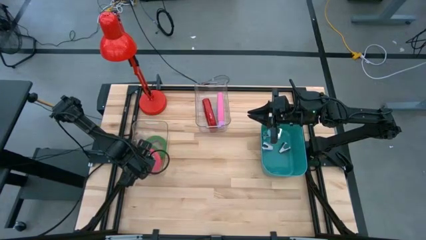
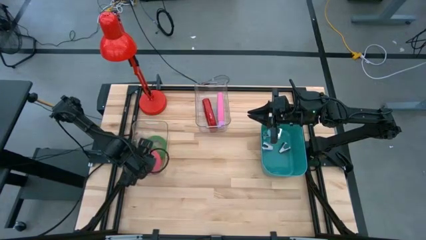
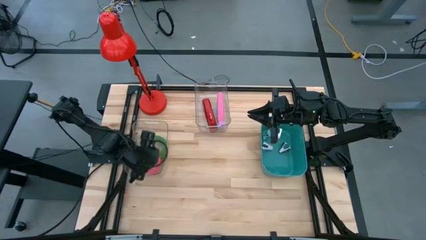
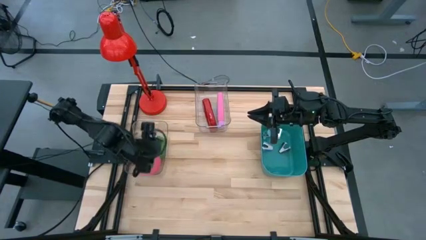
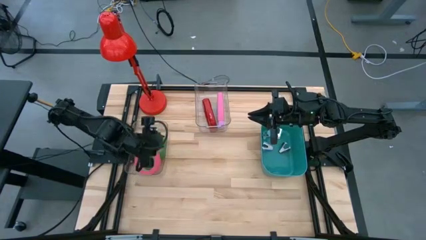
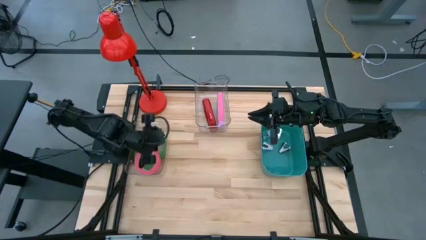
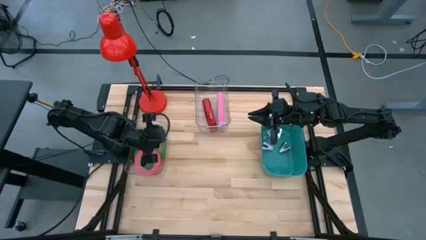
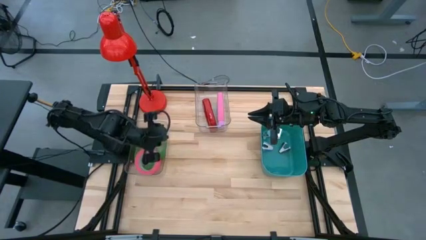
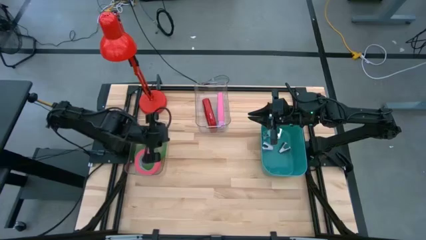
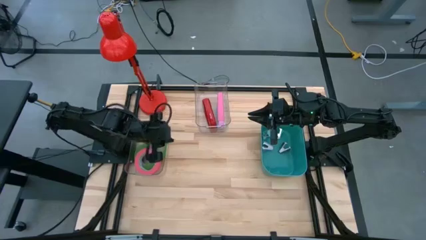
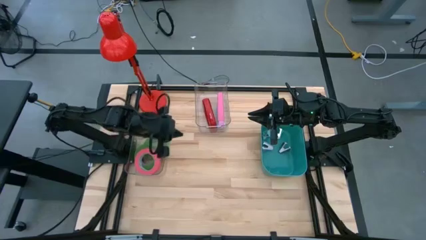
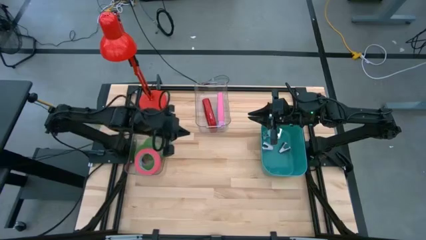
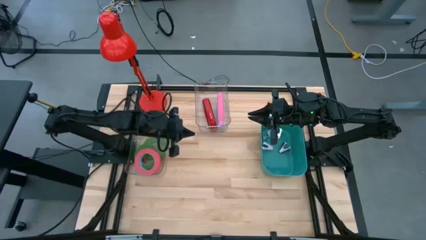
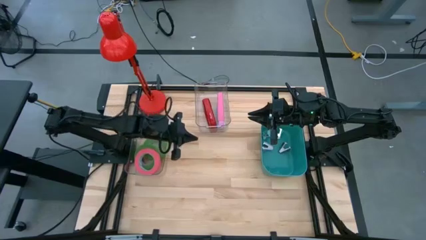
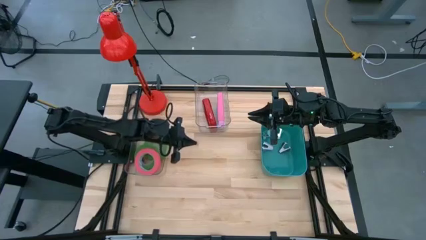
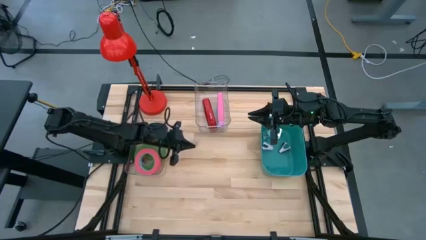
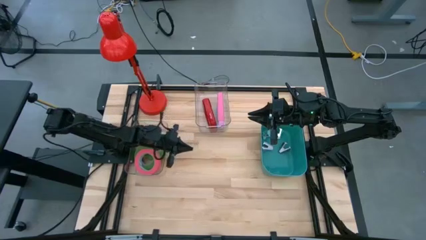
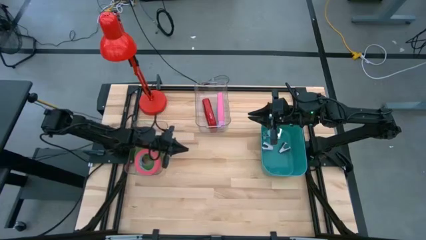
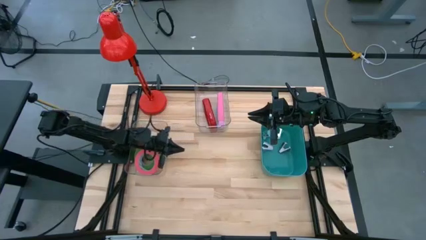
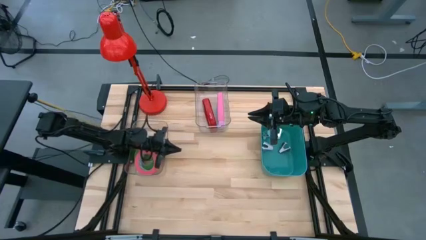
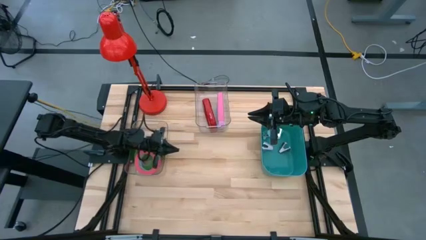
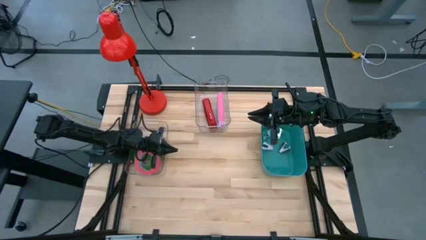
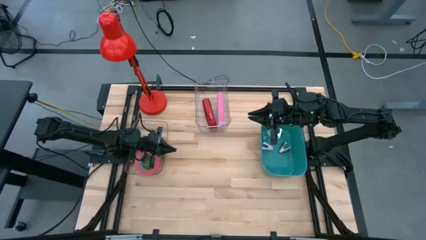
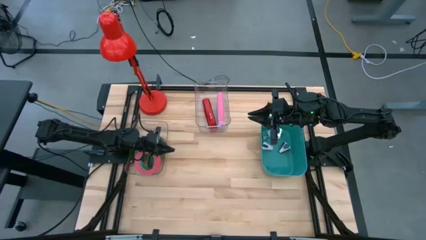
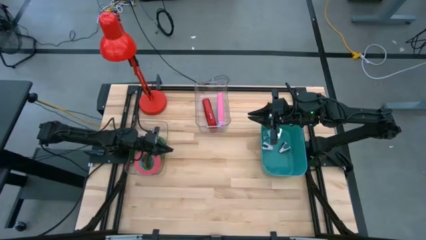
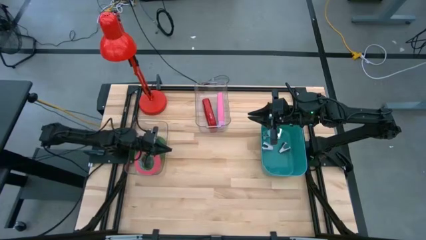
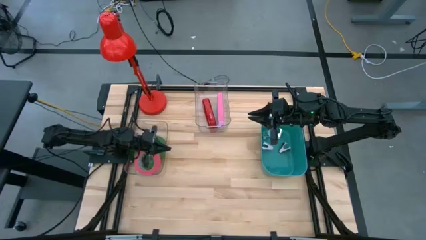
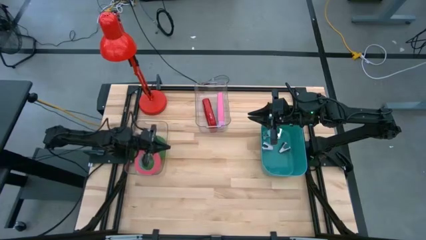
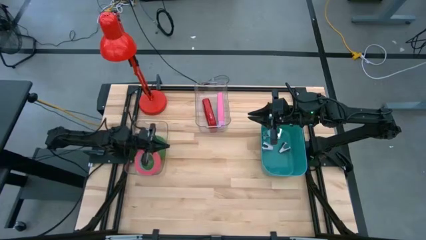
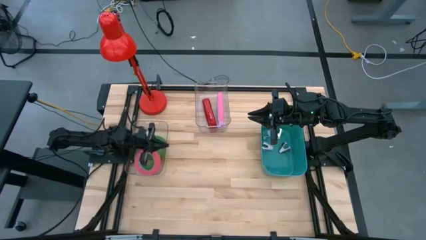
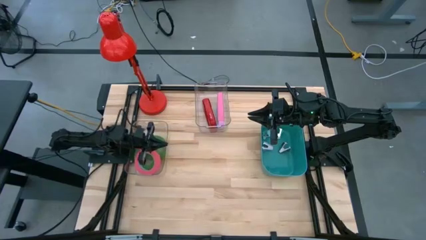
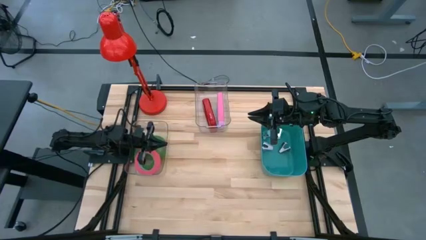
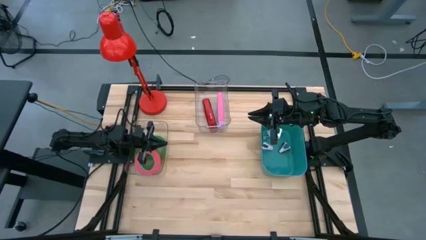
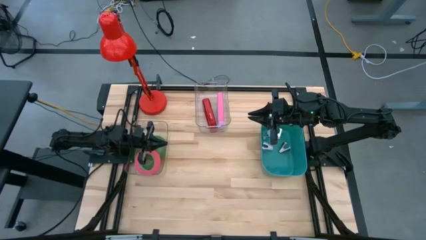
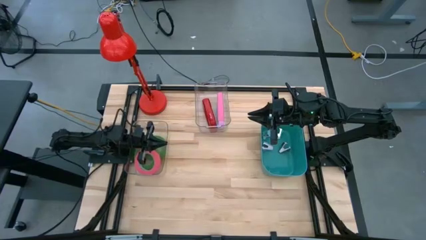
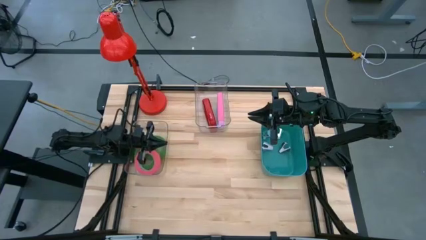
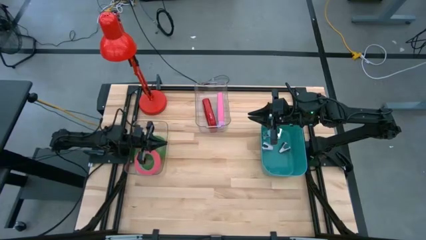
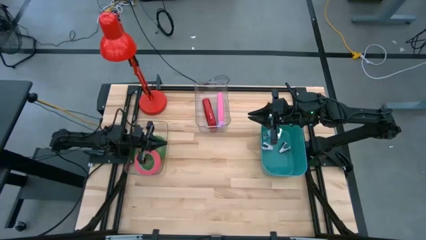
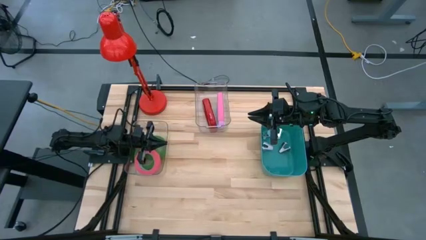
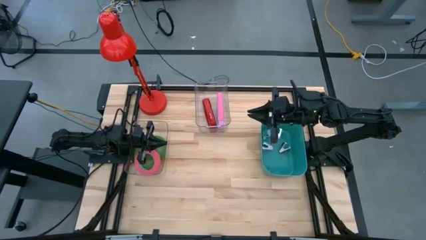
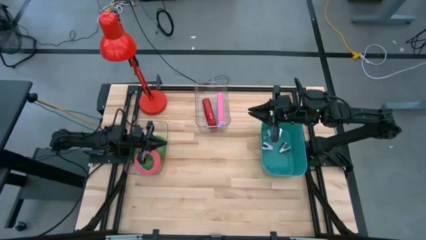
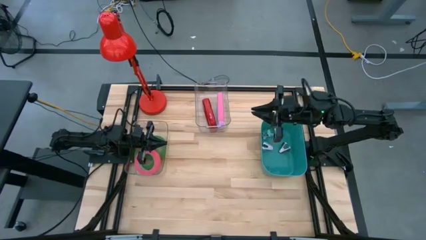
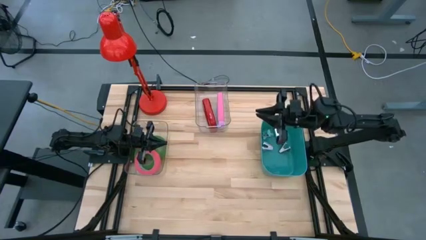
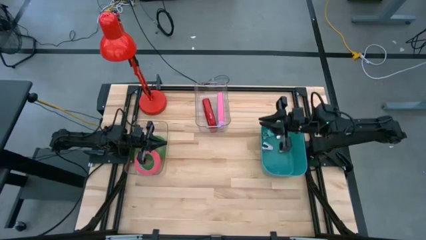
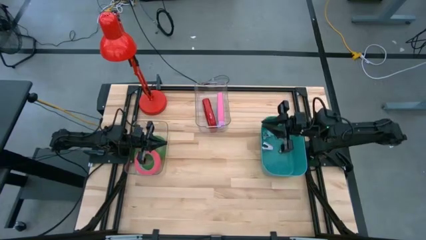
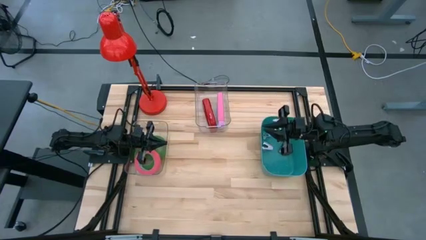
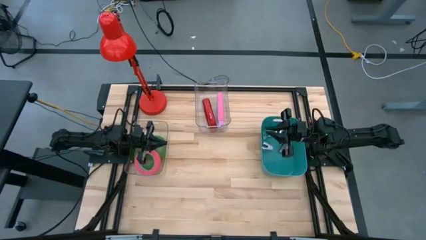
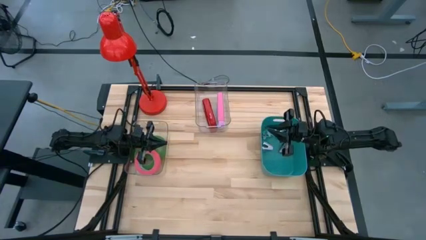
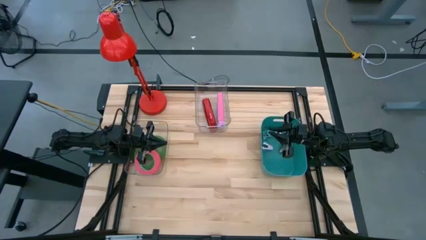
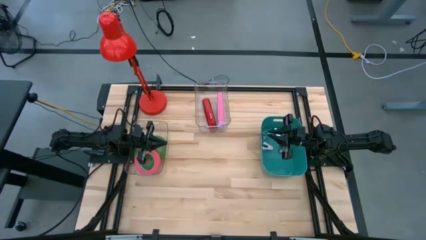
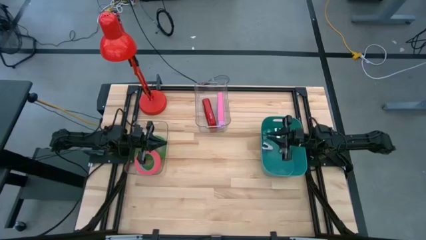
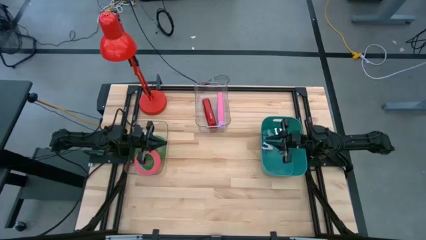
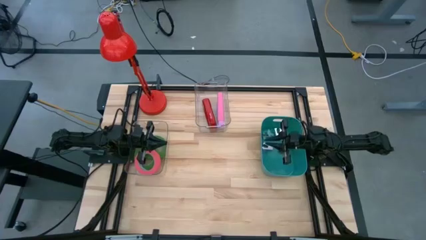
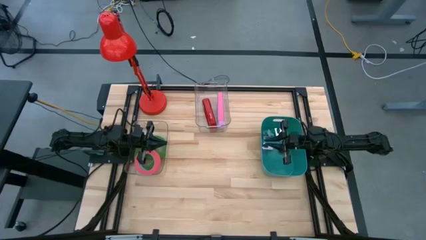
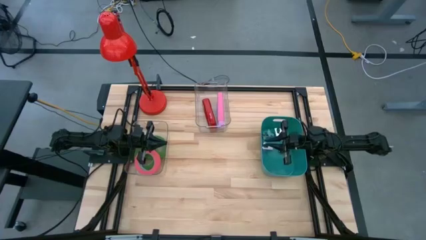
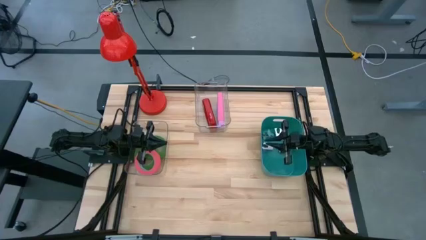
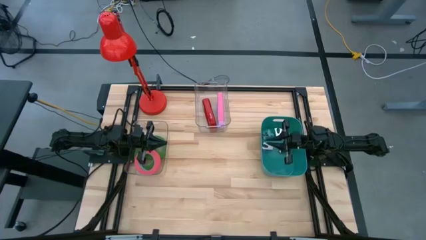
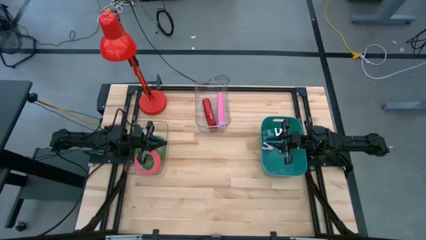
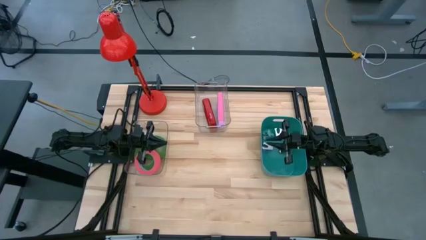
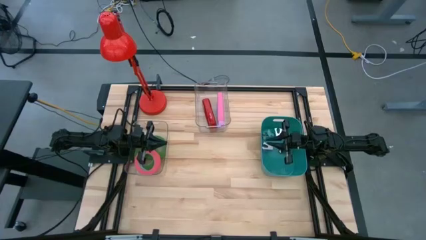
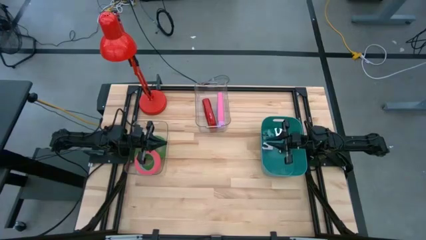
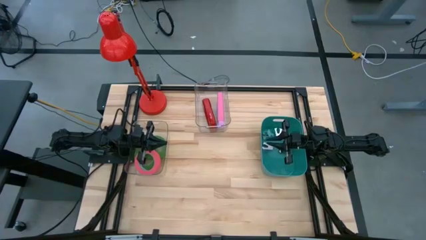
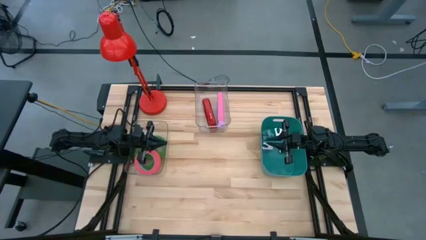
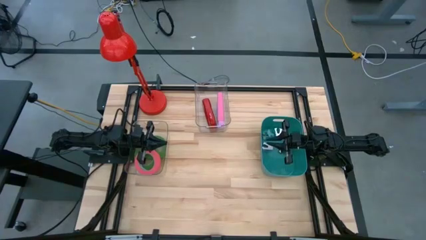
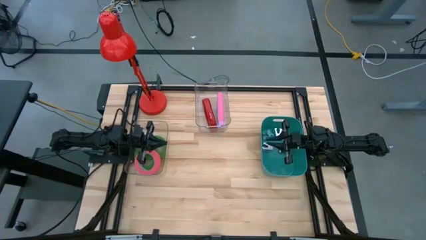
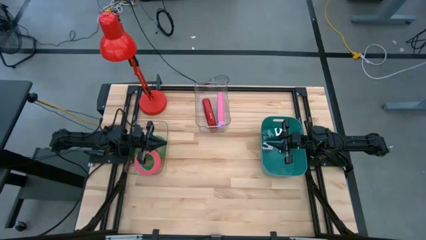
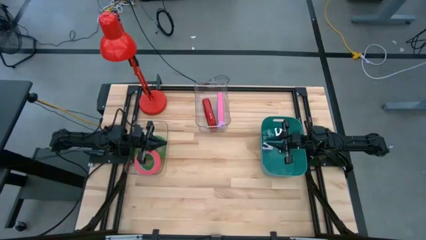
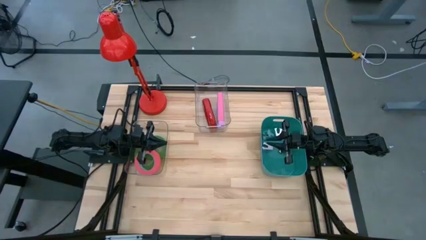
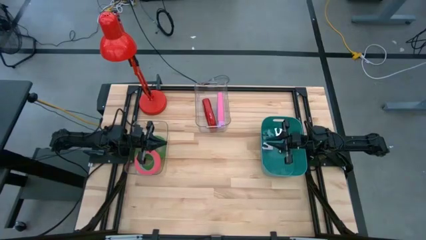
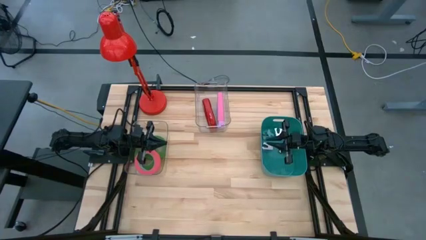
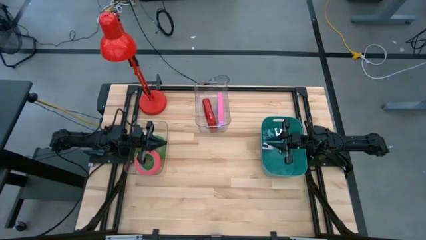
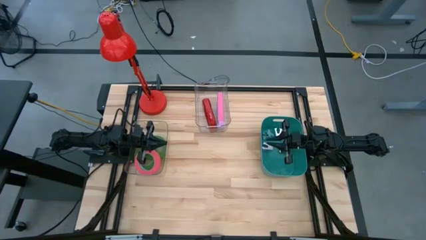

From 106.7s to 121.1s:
Task: Pick and place Stapler, Stapler remover, tape
Return to Home Position

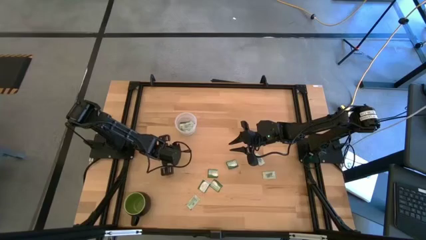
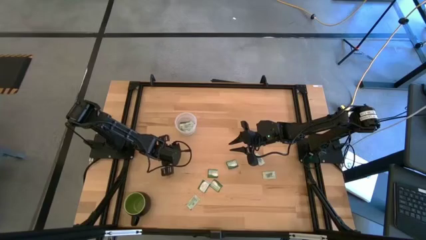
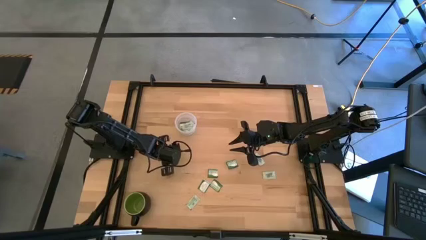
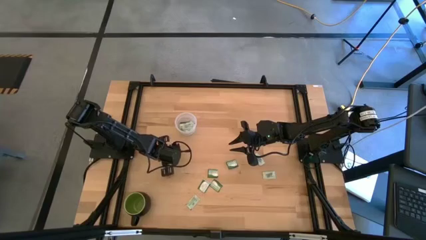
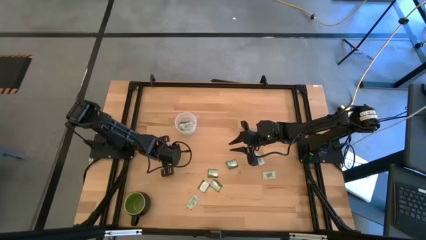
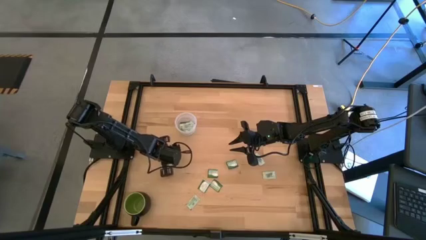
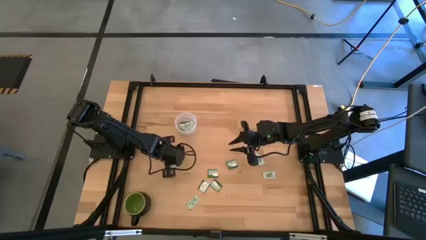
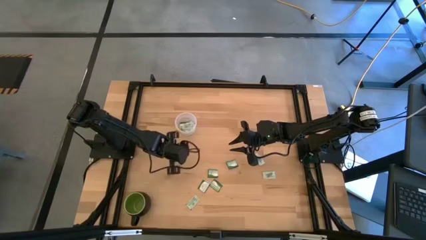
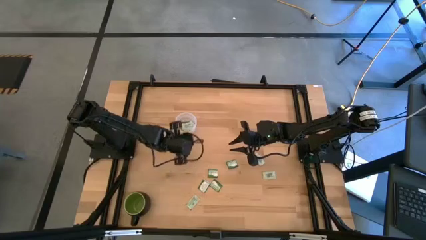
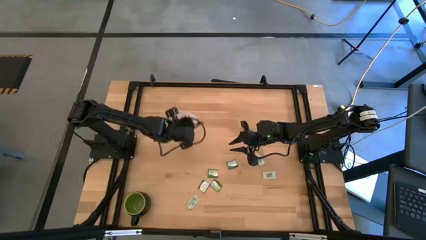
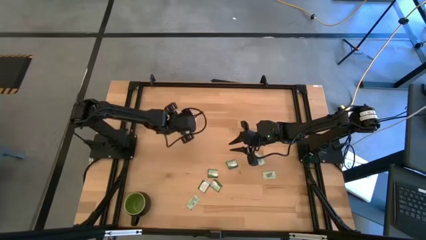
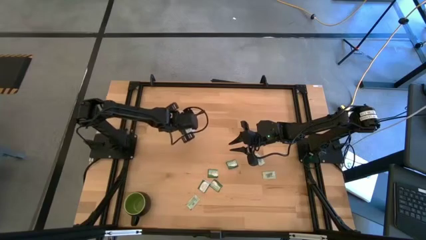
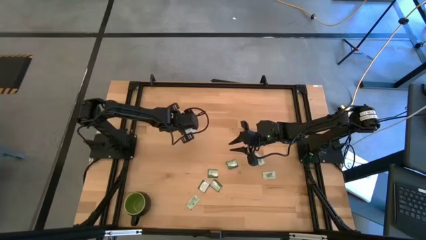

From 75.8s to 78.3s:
Task: Pick and place Stevia / Truvia into bins
Put the light green stevia packet into the transparent container

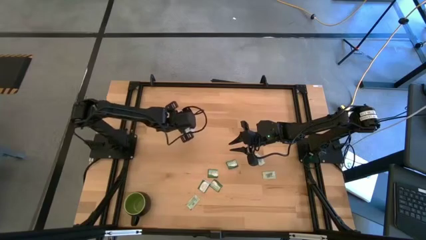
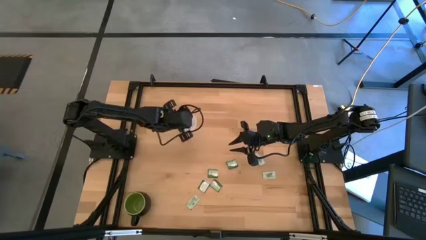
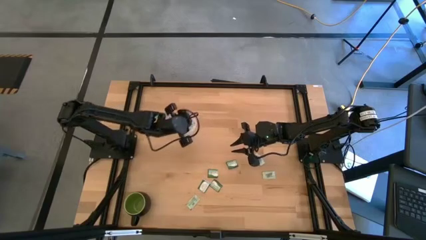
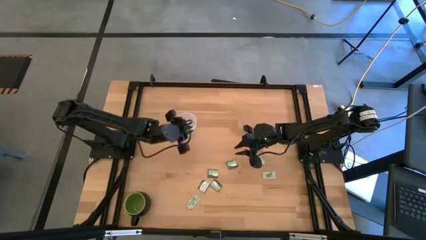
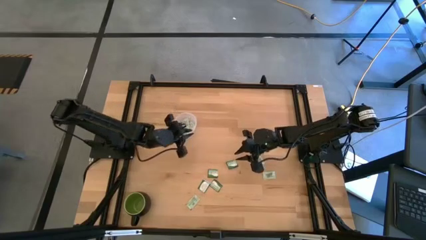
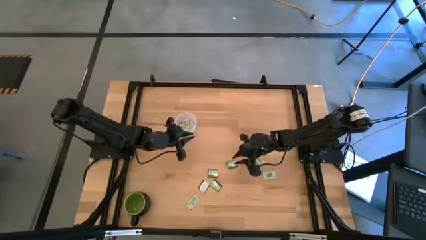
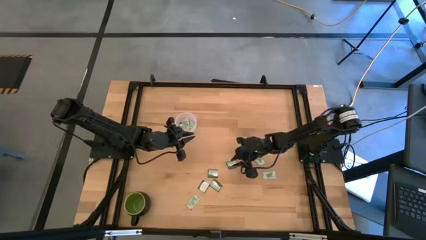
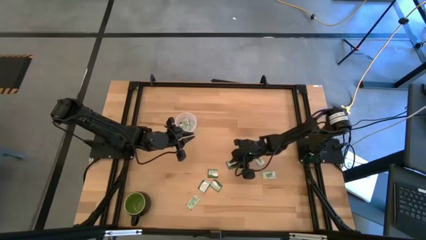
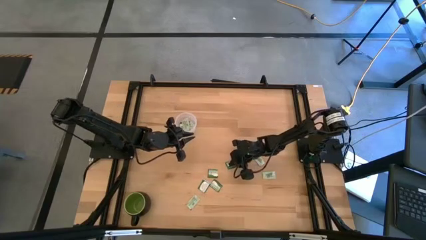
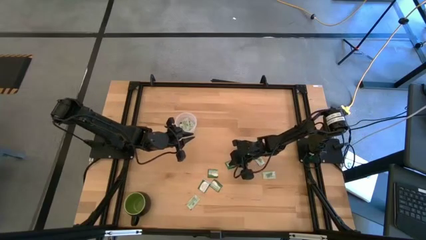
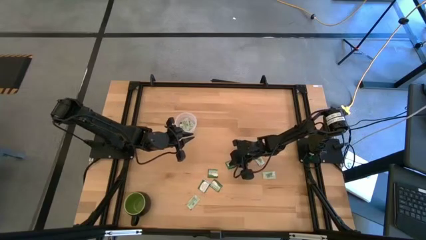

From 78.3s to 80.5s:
Put the green stevia packet into the transparent container
